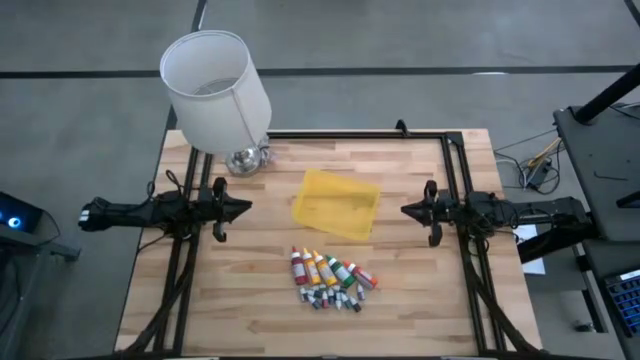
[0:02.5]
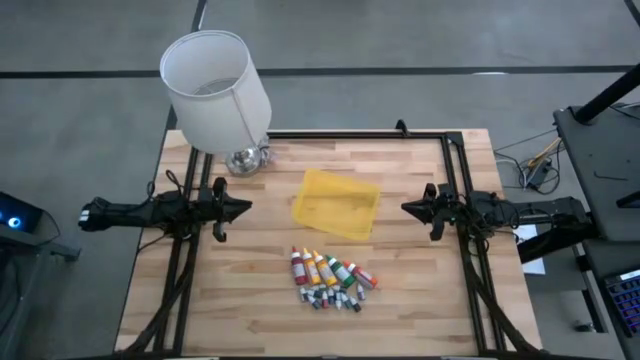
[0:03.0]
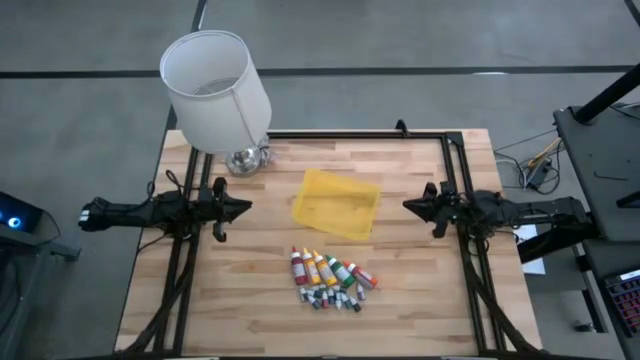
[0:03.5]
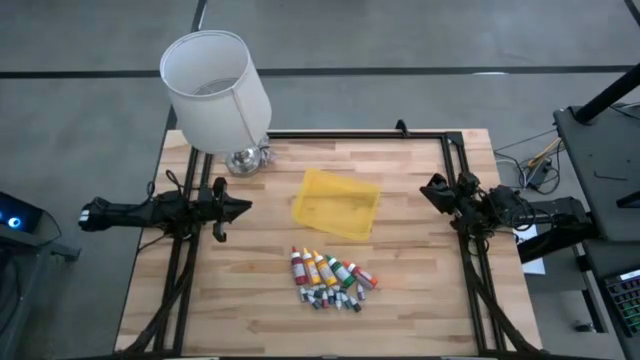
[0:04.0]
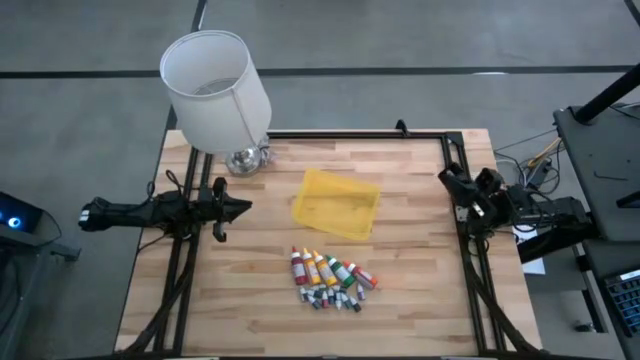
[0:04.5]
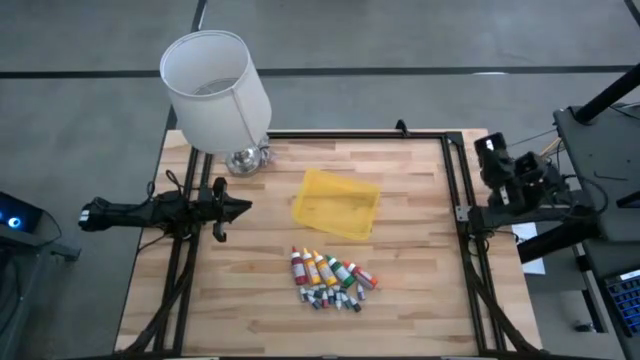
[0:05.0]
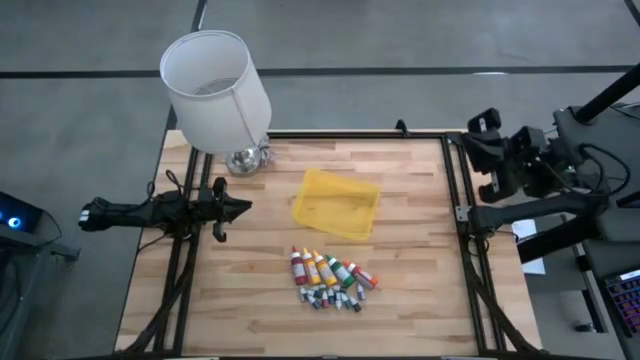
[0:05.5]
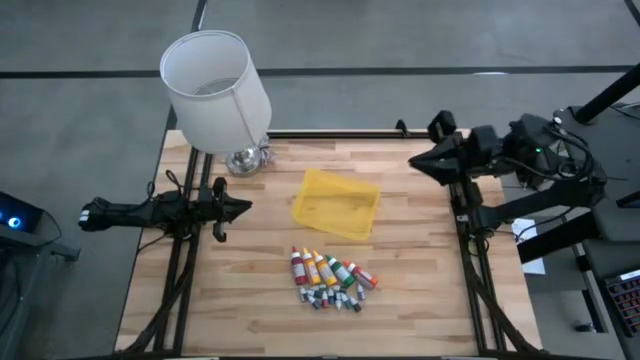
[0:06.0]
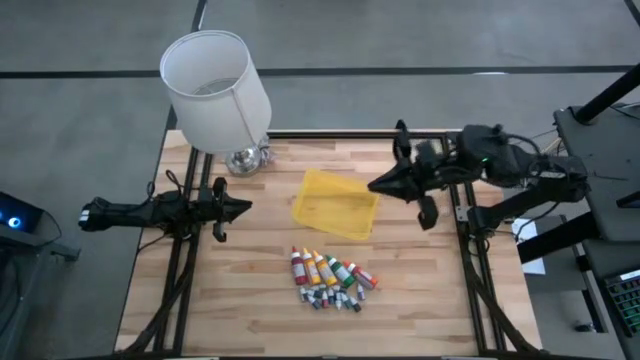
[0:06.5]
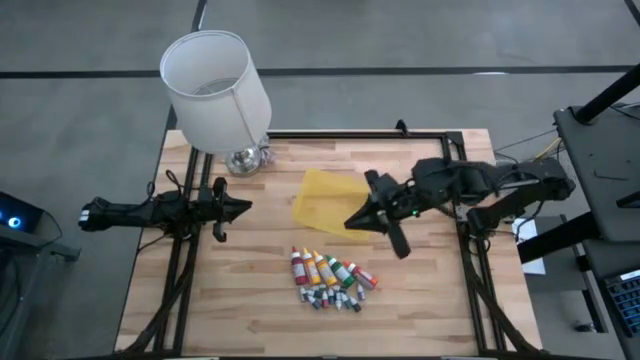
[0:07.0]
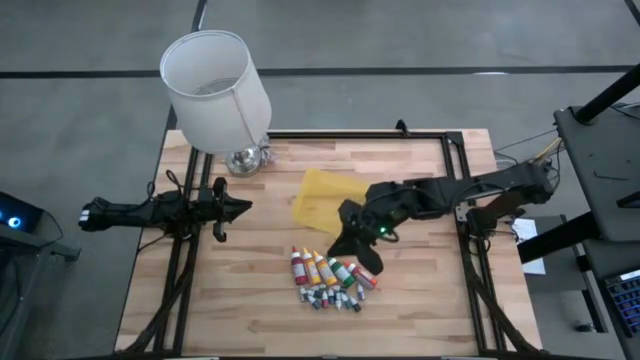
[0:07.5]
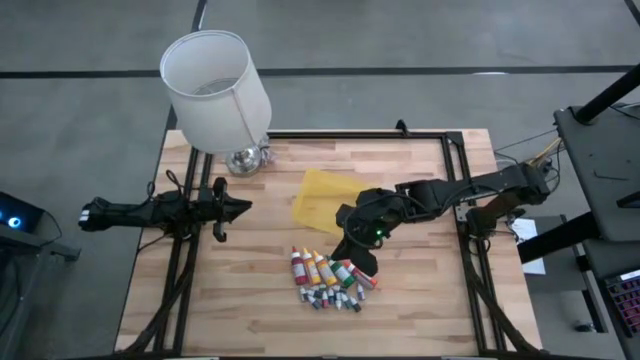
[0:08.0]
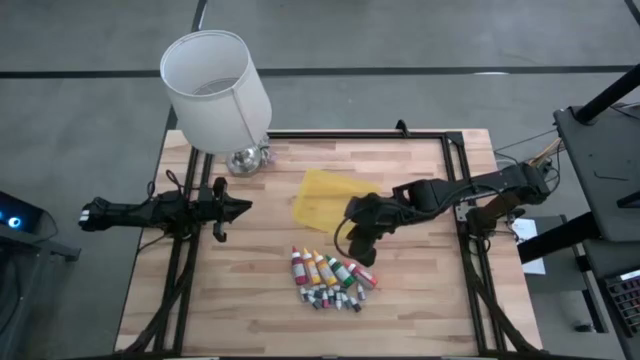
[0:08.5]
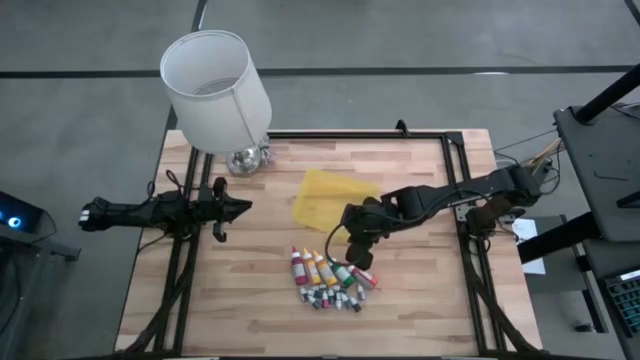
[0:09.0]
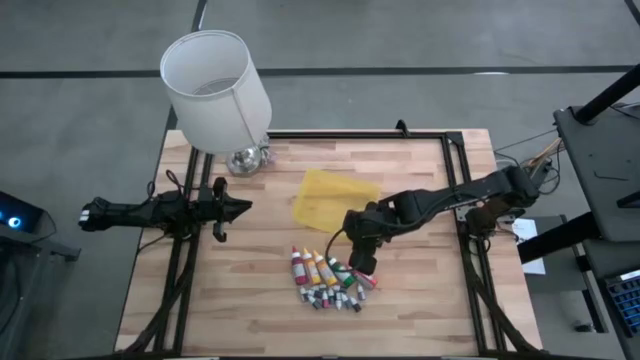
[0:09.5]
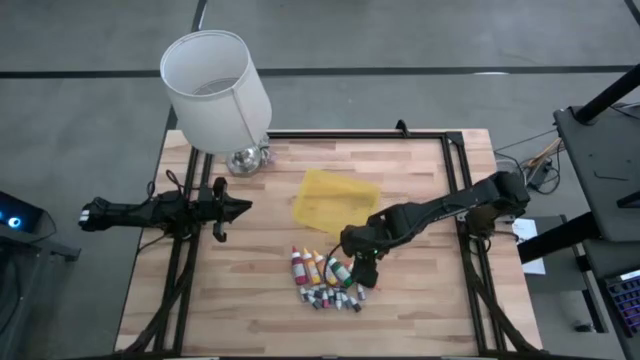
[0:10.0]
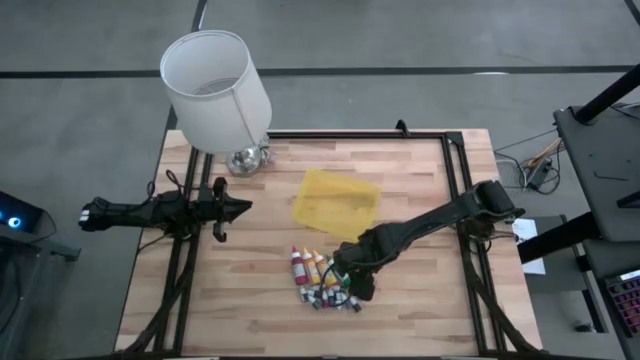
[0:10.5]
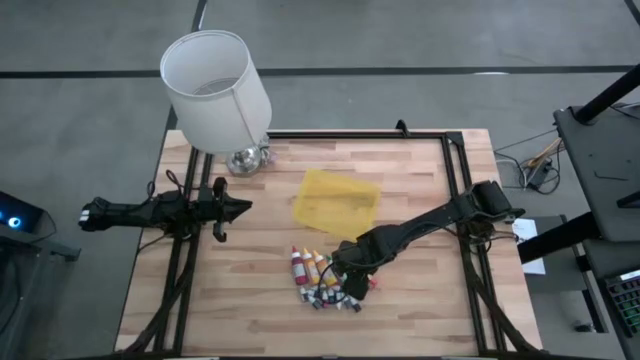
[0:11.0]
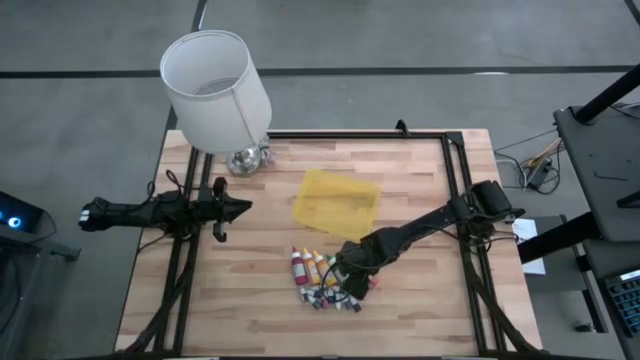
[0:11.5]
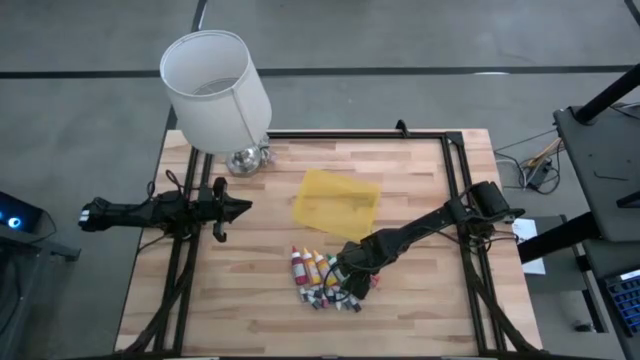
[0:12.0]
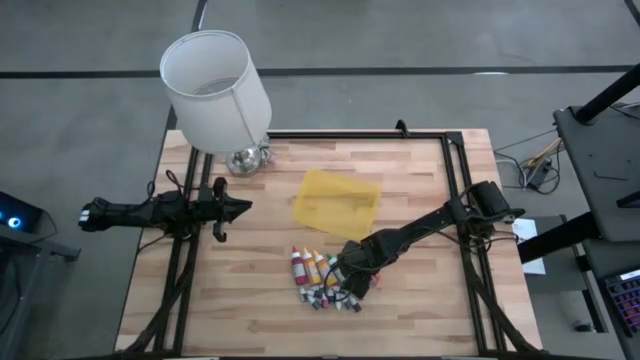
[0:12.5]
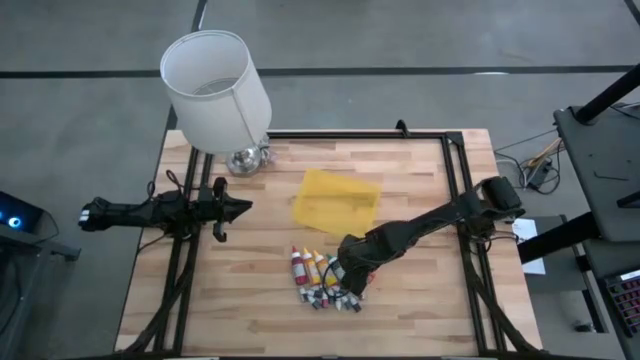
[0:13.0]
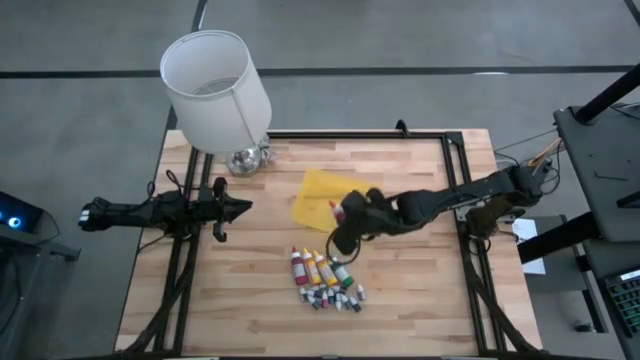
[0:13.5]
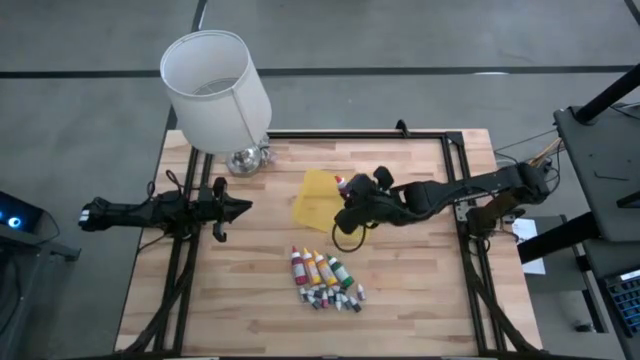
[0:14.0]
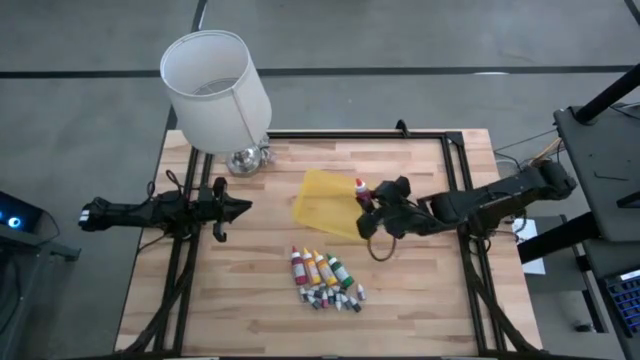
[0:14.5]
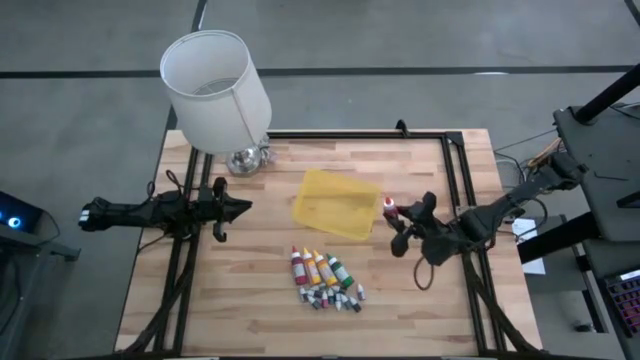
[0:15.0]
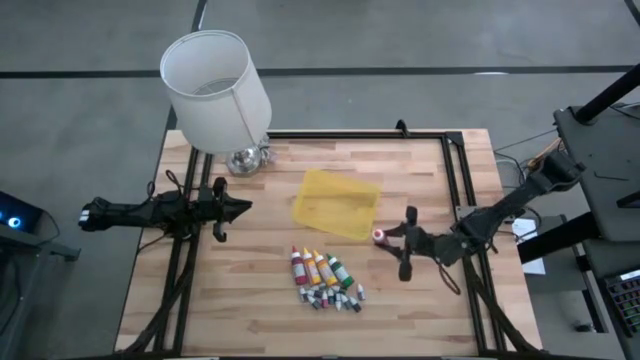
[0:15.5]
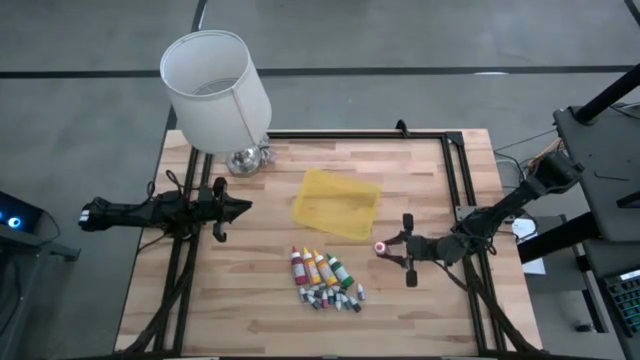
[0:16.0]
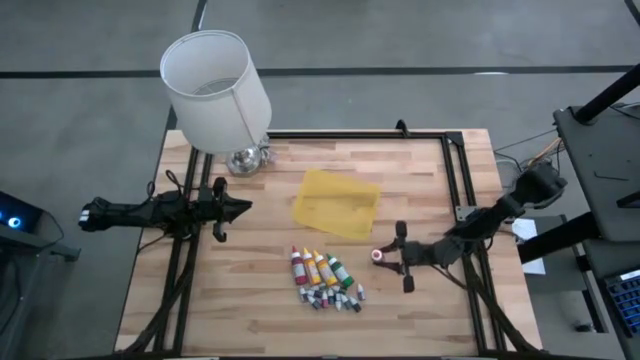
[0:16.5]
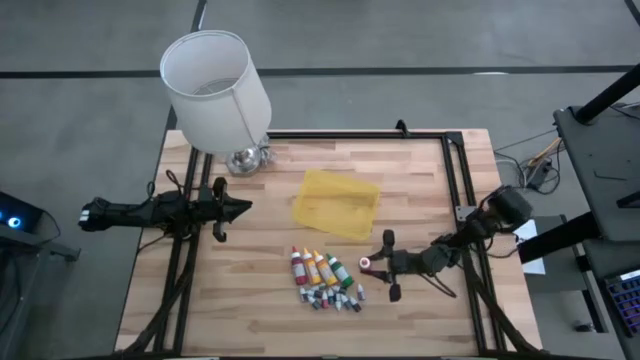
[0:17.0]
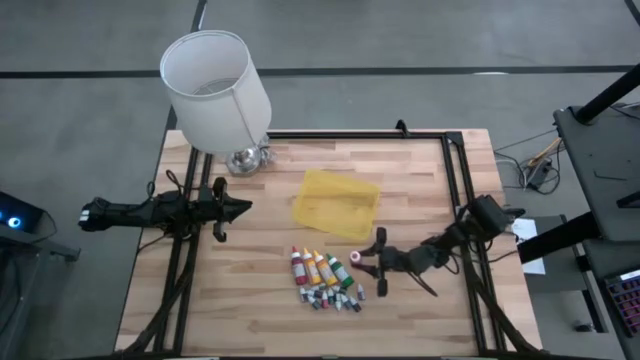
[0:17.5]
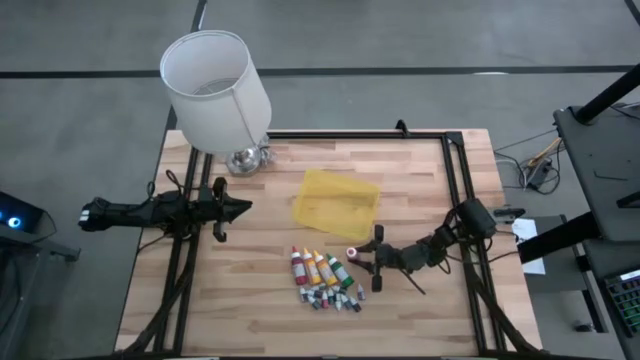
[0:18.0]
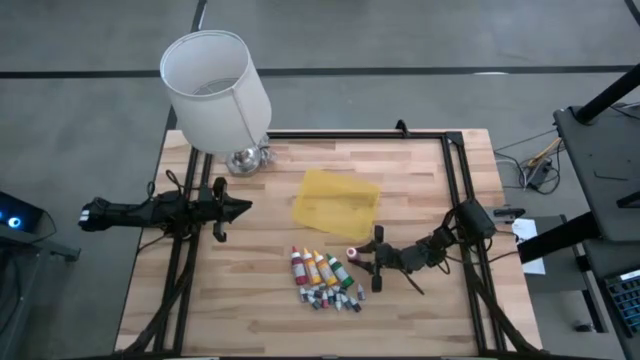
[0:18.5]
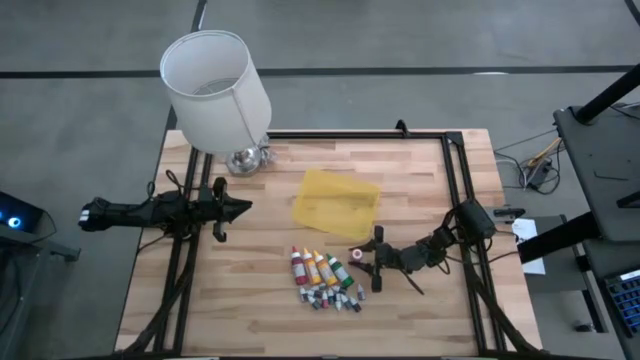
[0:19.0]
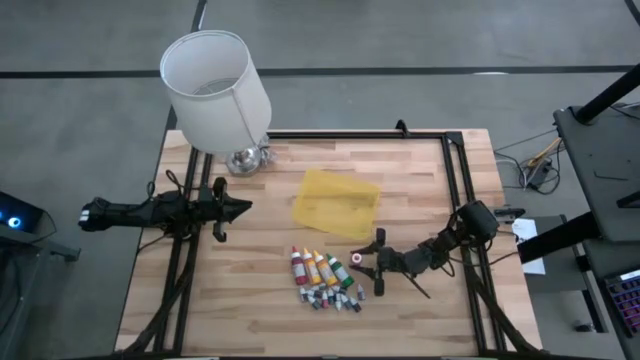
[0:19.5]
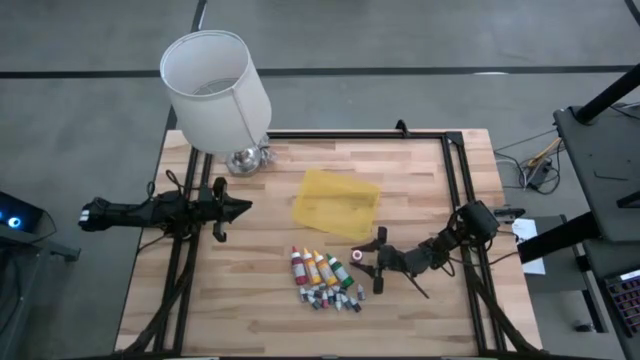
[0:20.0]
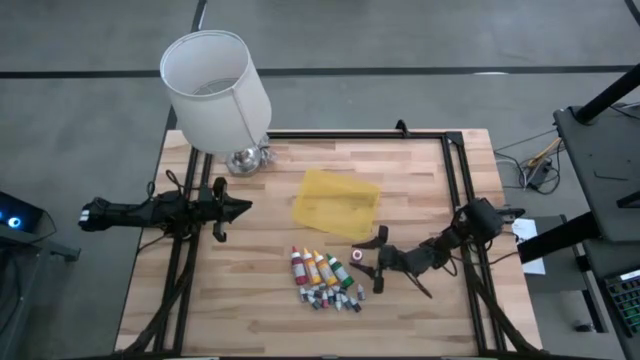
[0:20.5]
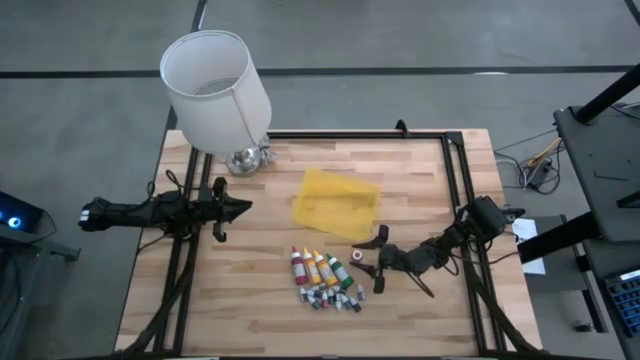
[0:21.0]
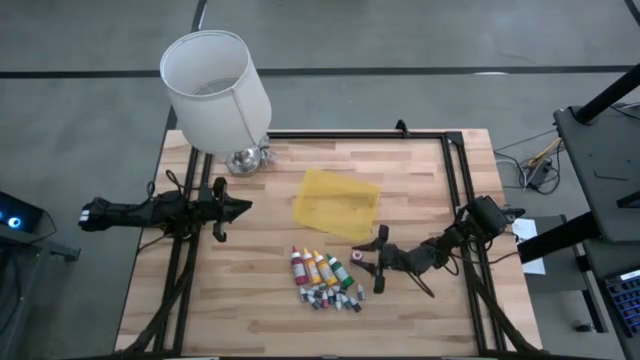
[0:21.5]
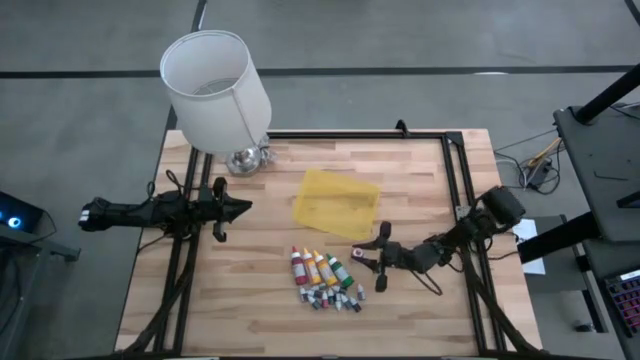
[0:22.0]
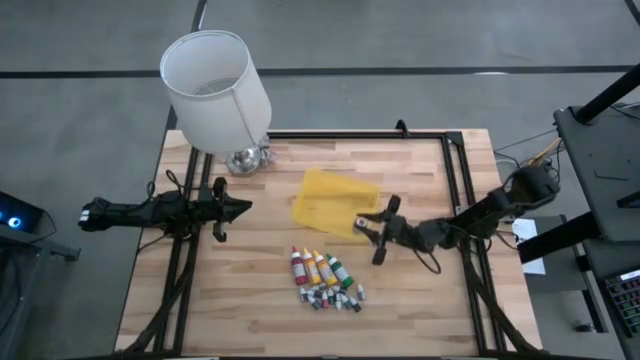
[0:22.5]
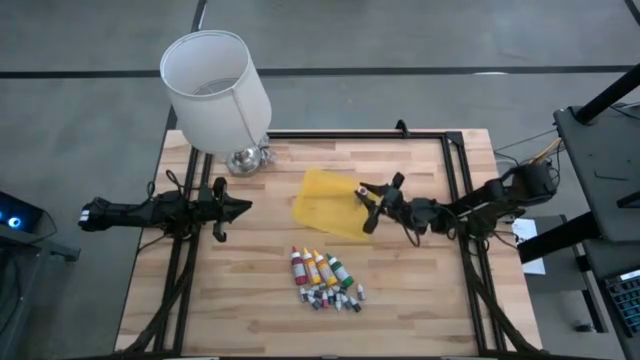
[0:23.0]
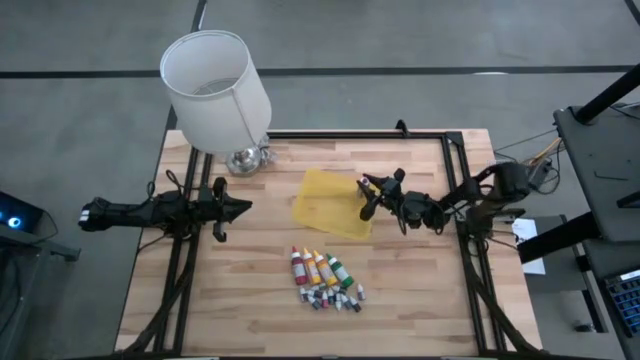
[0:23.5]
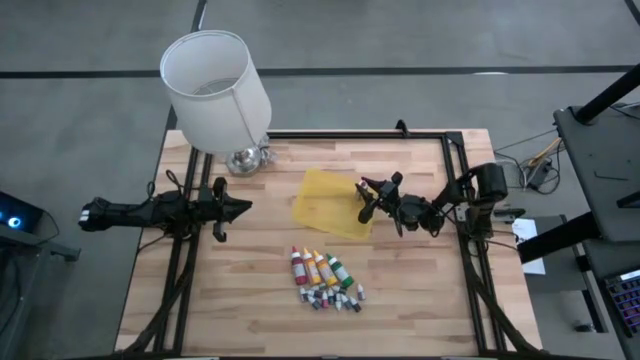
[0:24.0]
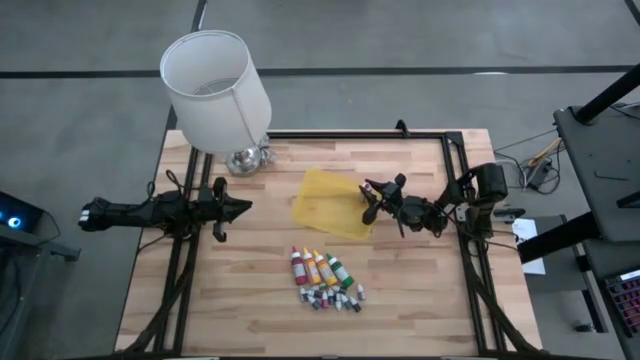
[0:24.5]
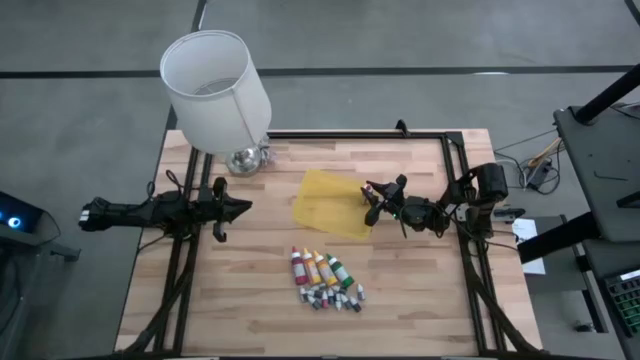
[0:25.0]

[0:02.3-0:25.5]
Task: Pick & Place food coloring
Put the large orange food coloring bottle into the yellow bin
